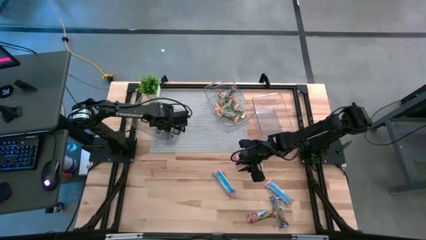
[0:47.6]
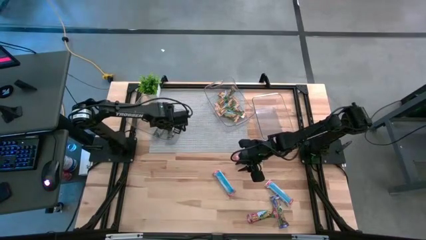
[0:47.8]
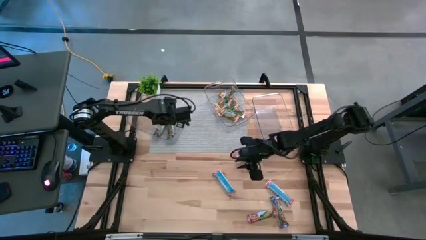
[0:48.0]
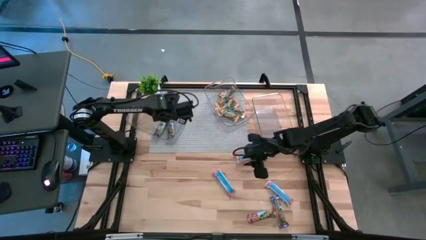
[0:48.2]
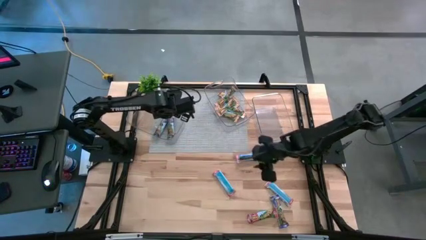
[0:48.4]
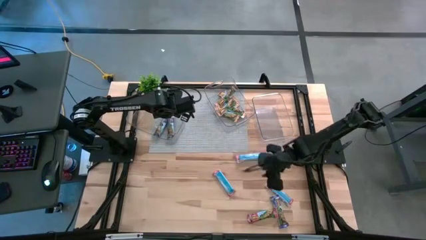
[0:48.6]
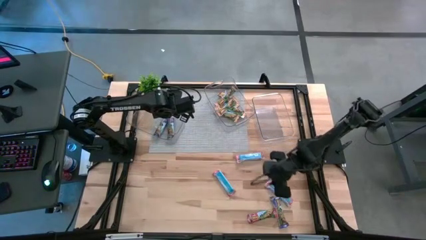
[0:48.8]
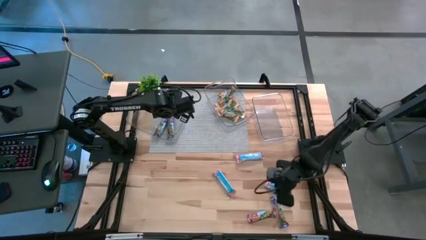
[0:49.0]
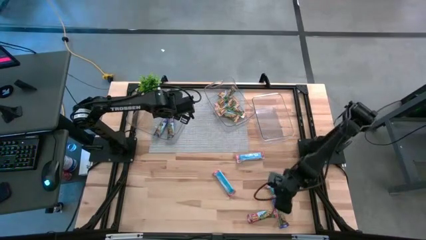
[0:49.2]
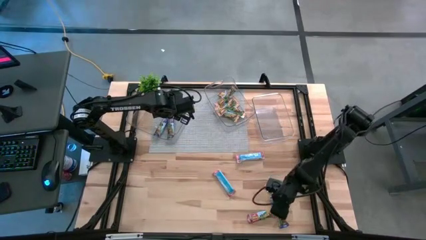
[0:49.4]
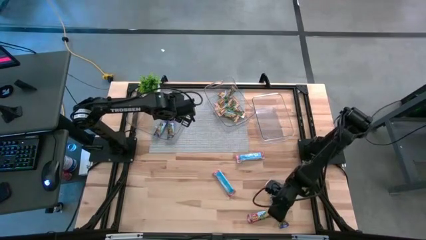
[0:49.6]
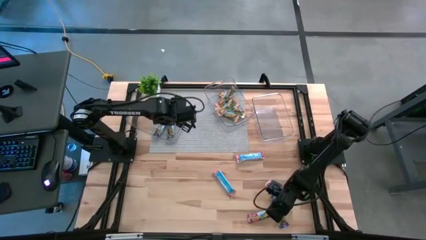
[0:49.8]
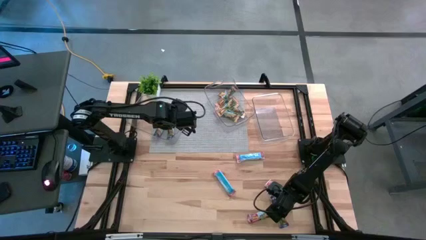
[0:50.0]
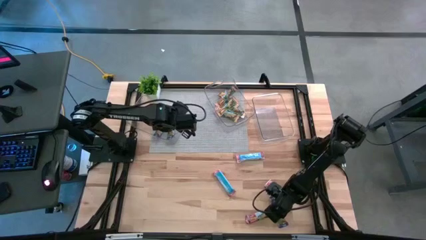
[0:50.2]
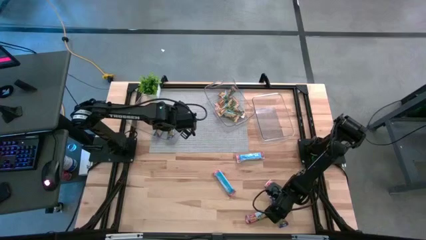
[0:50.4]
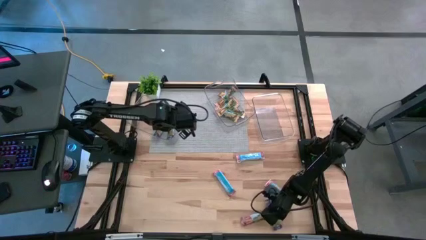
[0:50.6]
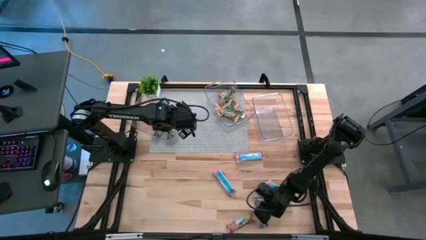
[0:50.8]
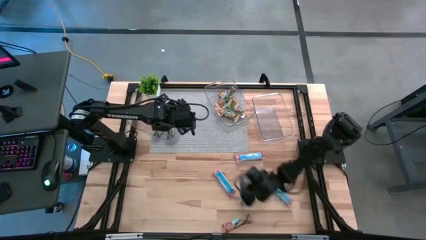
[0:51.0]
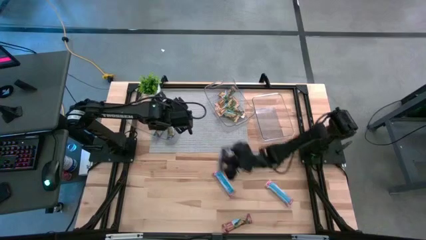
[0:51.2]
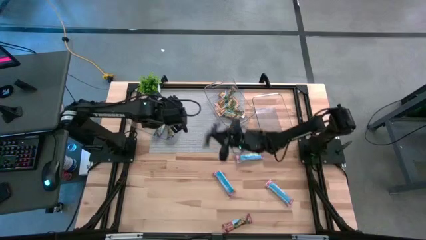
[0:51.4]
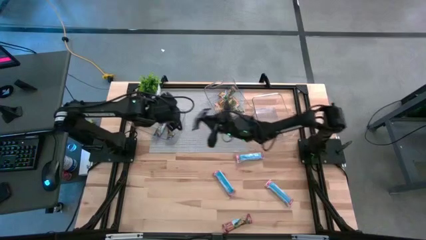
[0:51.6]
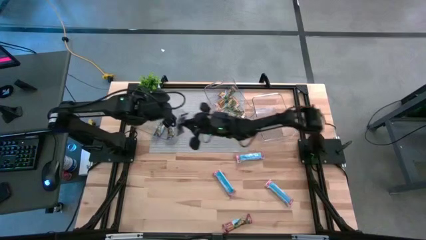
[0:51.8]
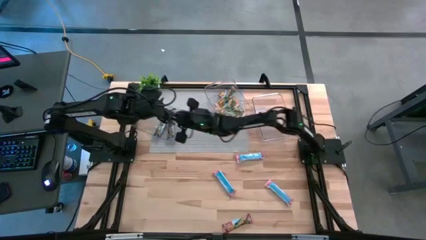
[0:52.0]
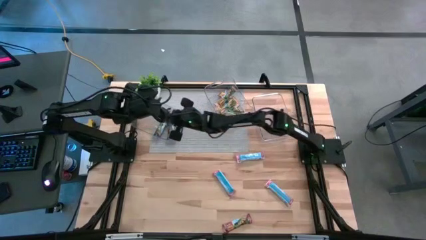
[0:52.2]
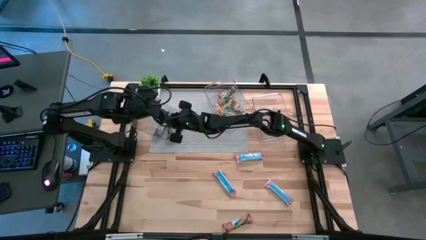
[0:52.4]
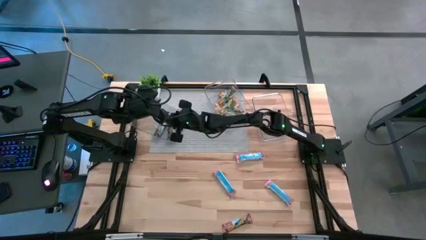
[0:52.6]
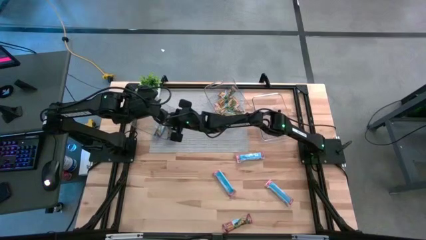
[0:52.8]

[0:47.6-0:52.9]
Task: Pick and place Granola Bars by type
Put the blue granola bar into the left transparent bin

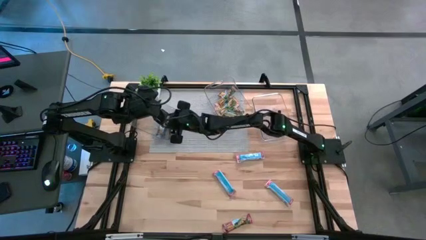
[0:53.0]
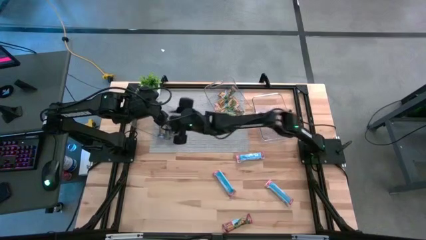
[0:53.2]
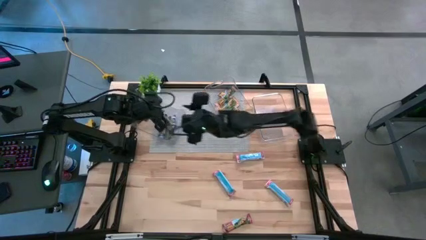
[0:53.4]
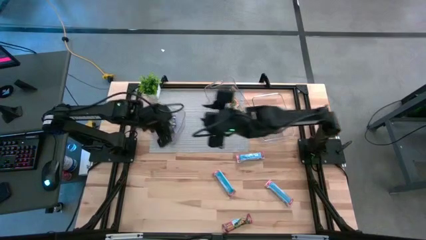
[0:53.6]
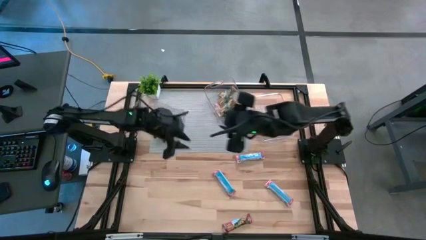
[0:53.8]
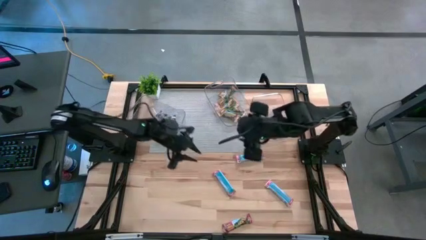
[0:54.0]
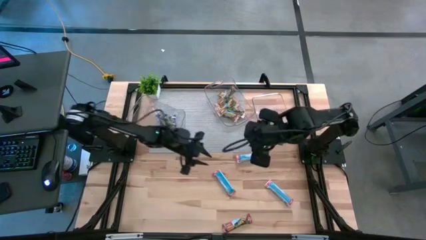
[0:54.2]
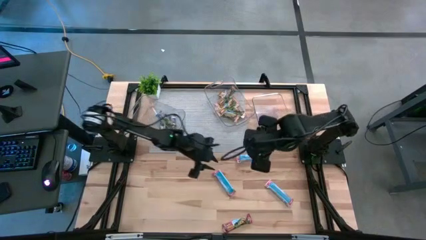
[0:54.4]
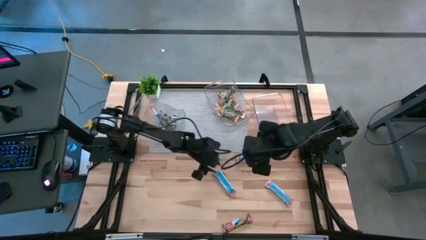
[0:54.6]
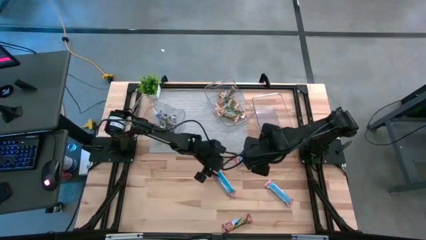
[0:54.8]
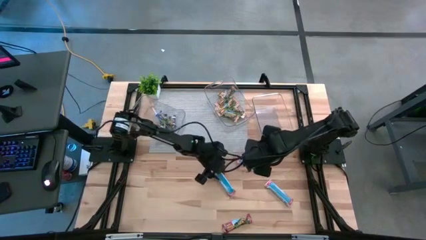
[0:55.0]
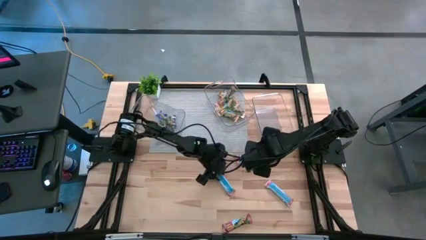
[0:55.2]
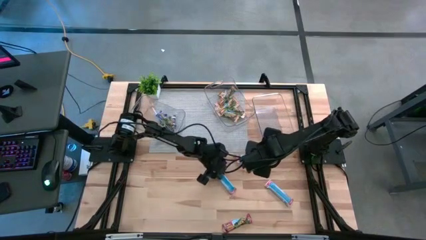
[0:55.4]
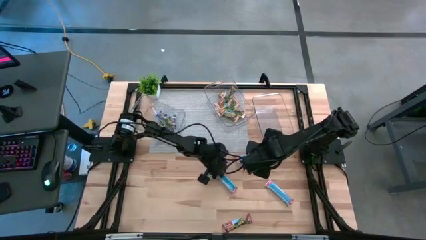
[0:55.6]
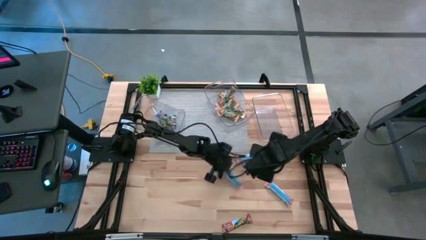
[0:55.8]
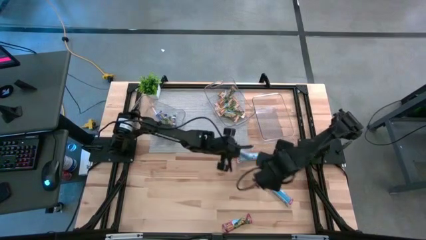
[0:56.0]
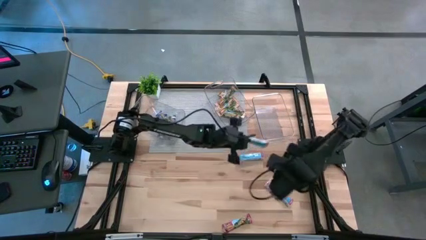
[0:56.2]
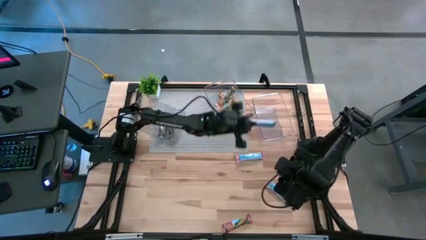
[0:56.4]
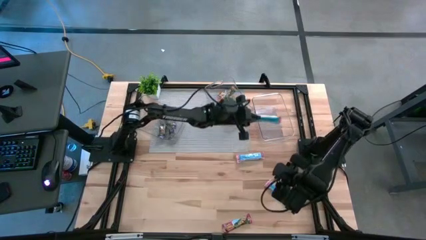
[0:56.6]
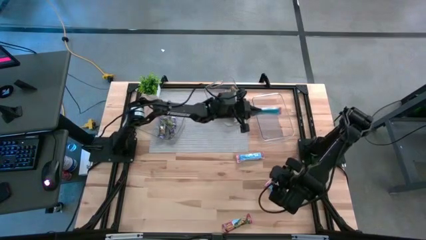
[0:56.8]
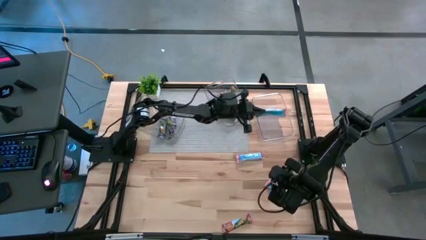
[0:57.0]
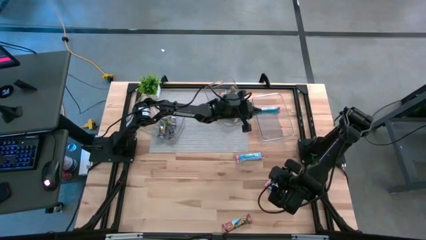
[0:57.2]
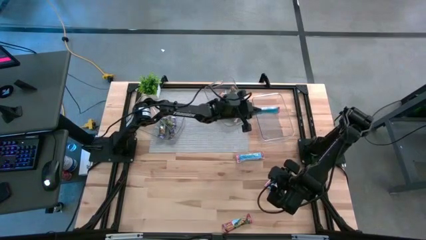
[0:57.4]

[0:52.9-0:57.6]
Put the red granola bar into the right transparent bin

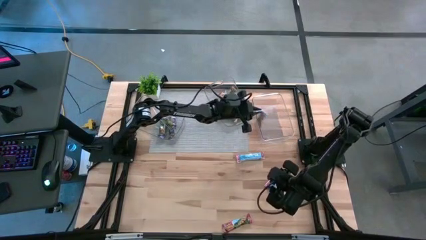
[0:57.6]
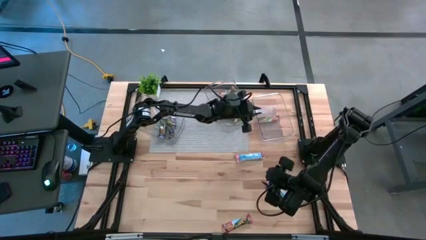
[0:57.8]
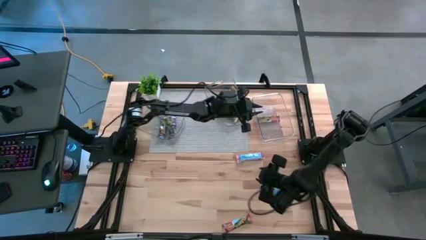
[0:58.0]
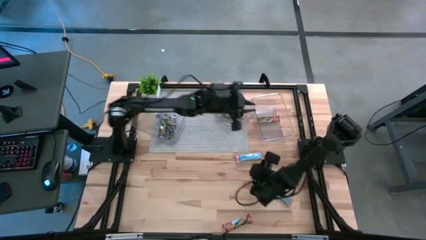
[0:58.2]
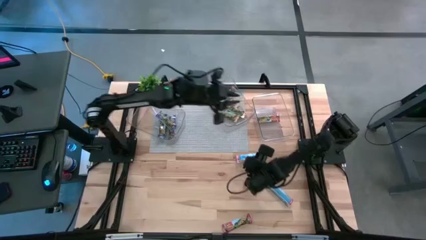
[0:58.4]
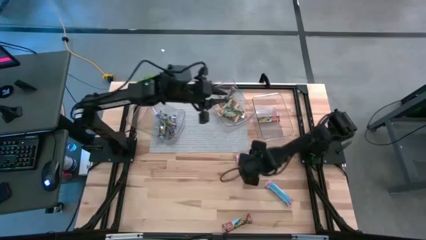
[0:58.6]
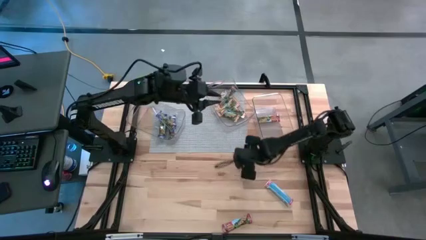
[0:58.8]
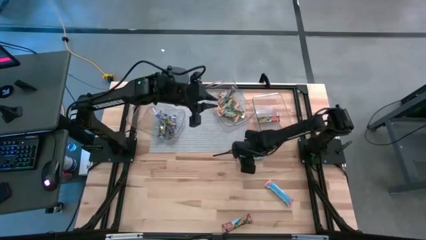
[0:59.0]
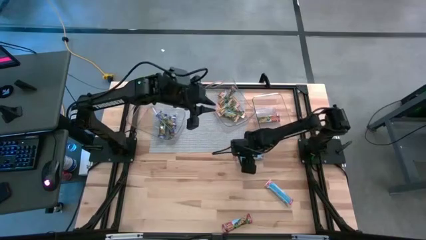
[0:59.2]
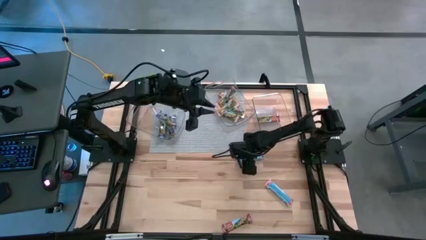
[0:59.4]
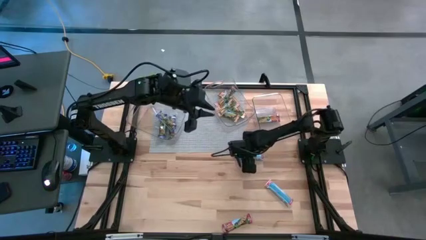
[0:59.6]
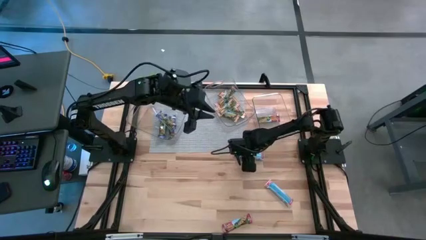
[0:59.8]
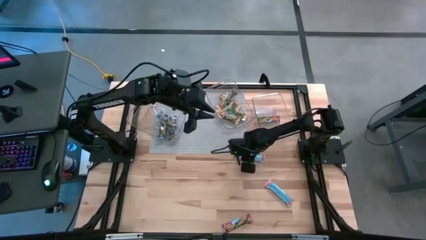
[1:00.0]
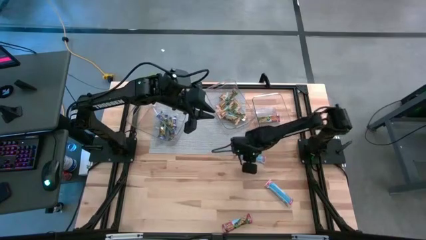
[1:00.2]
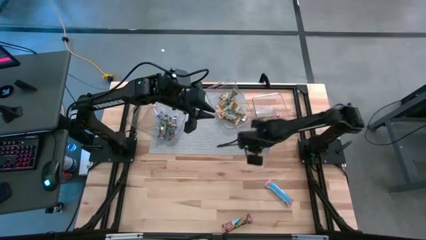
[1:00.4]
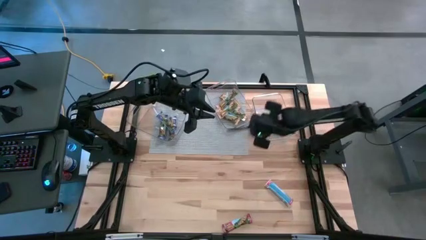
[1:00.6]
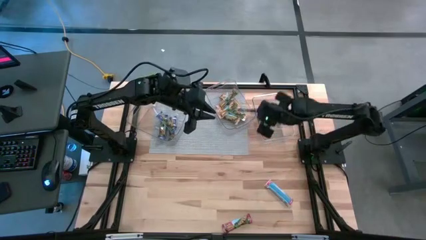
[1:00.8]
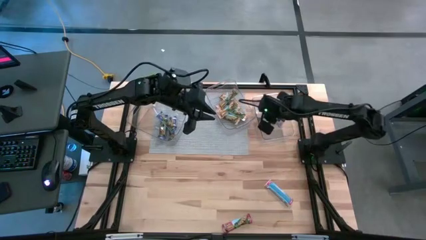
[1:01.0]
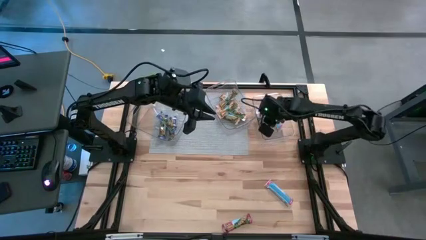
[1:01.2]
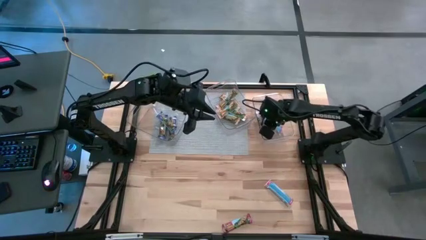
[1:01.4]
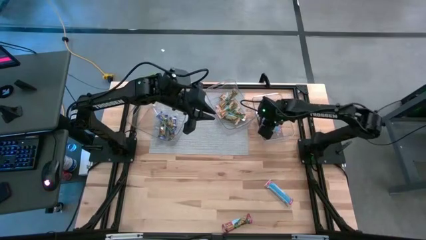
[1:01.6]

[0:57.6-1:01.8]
Put the red granola bar into the right transparent bin

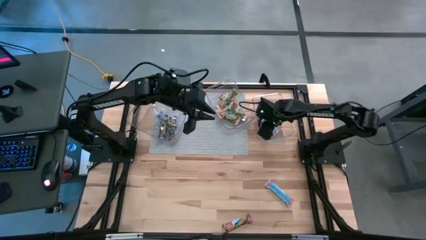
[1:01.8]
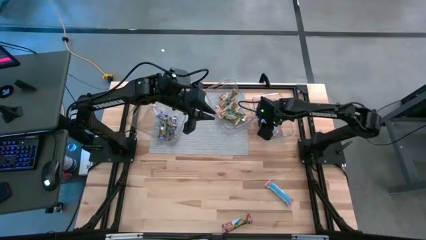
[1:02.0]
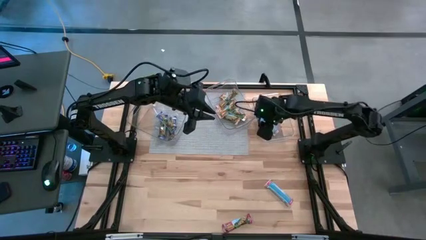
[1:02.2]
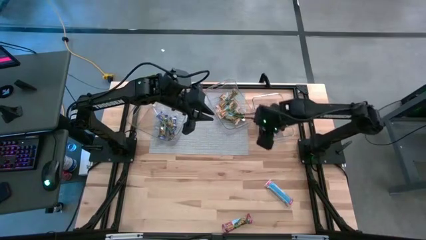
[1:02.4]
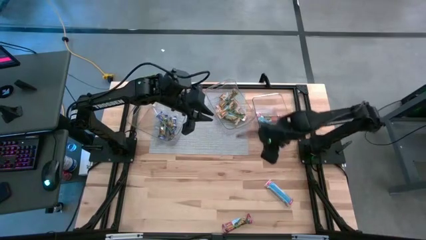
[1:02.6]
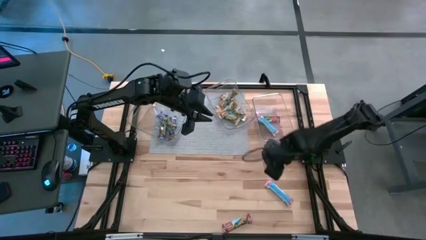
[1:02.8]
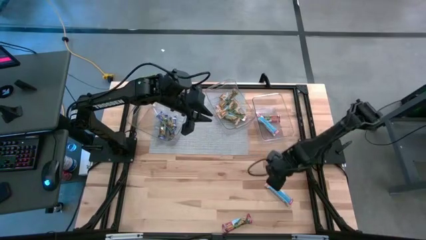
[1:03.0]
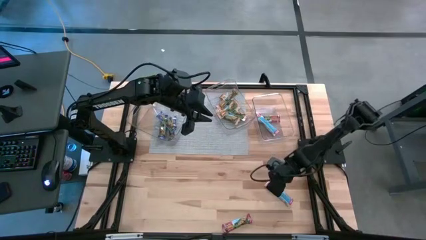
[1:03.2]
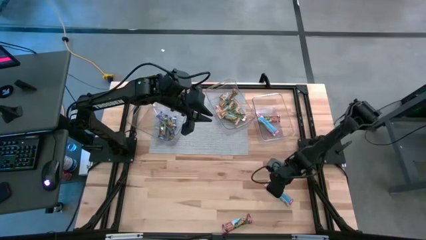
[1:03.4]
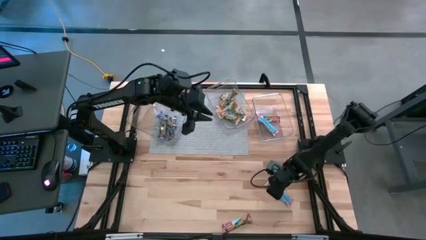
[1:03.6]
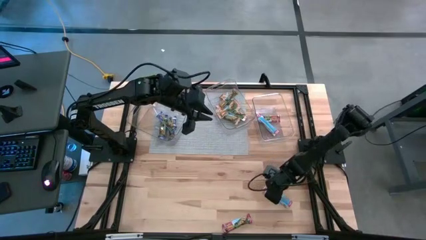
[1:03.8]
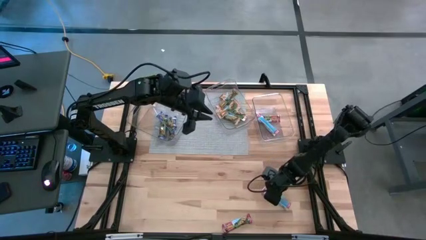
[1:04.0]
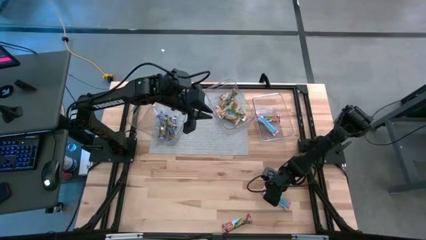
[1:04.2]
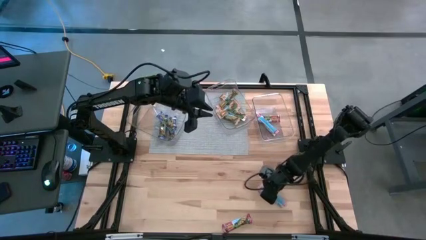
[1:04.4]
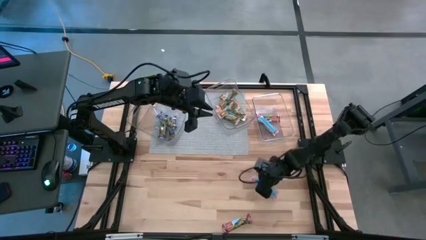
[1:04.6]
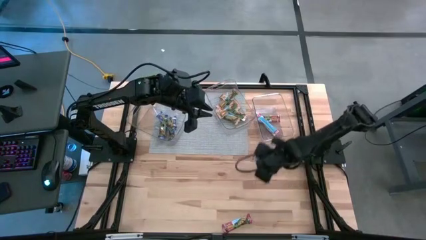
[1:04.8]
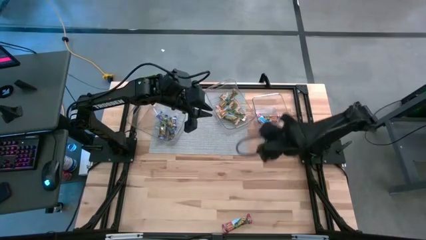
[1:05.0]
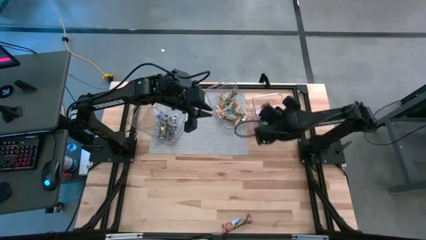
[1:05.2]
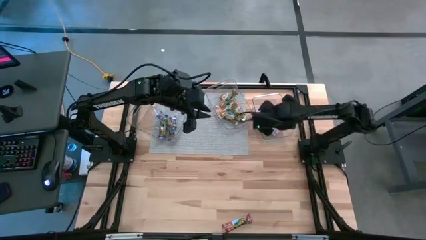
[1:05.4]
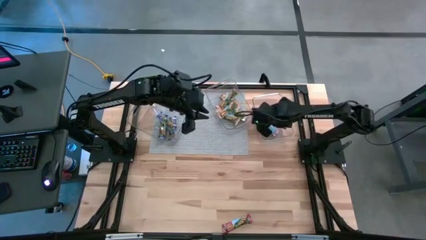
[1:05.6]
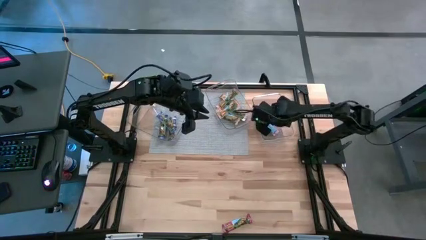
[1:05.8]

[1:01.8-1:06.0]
Put the red granola bar into the right transparent bin
